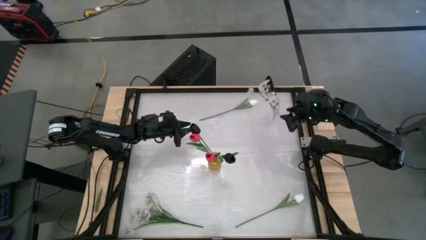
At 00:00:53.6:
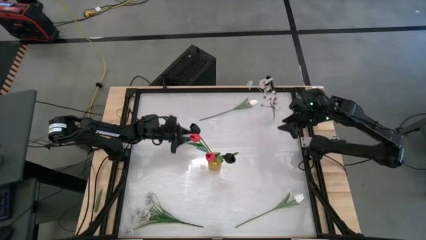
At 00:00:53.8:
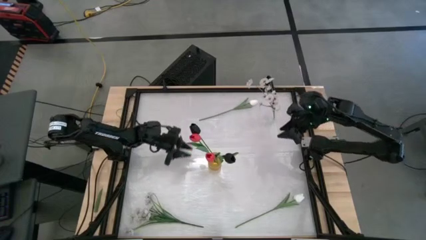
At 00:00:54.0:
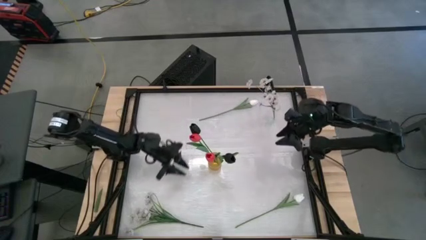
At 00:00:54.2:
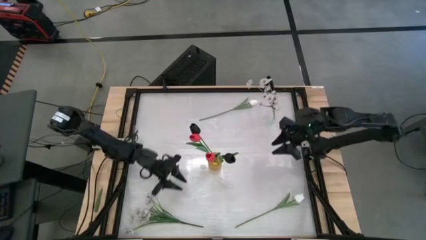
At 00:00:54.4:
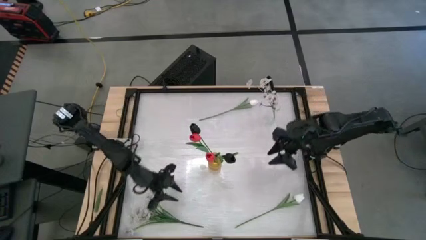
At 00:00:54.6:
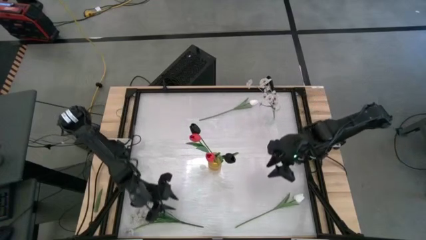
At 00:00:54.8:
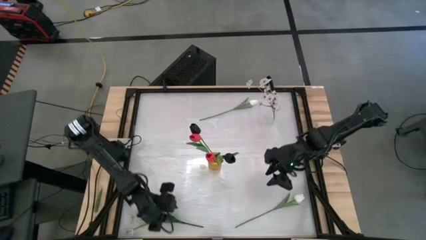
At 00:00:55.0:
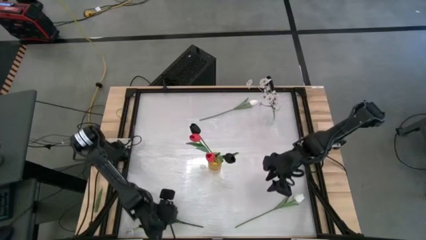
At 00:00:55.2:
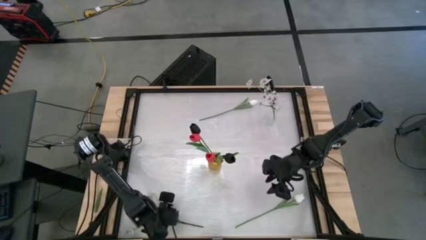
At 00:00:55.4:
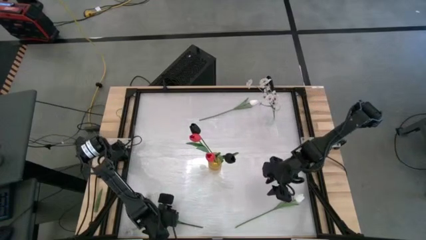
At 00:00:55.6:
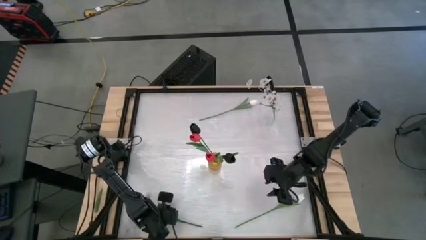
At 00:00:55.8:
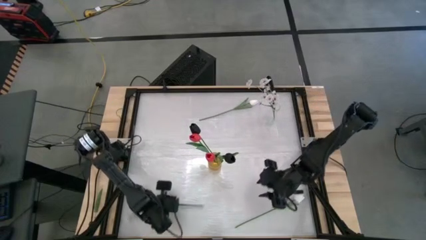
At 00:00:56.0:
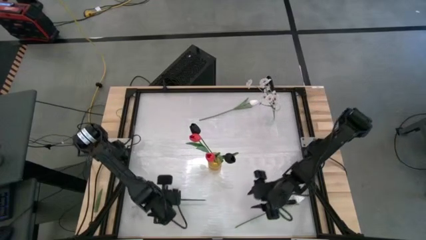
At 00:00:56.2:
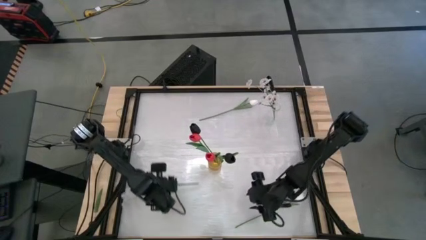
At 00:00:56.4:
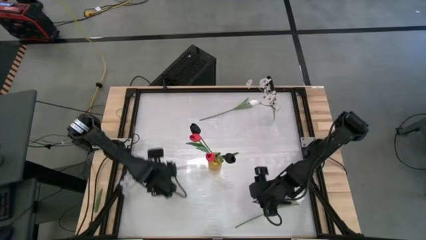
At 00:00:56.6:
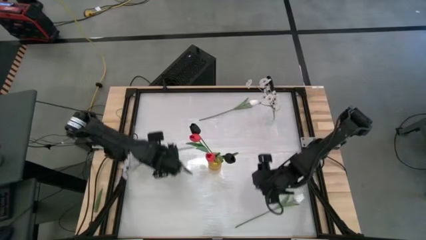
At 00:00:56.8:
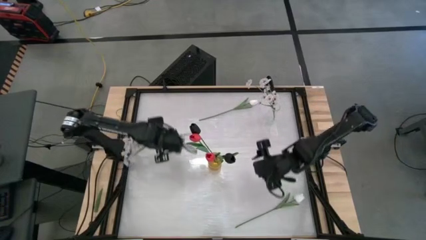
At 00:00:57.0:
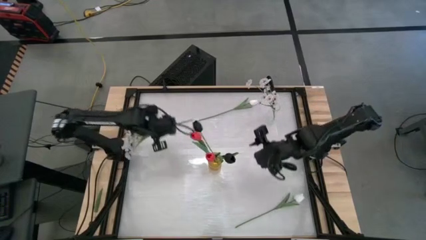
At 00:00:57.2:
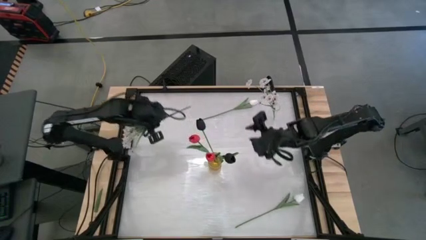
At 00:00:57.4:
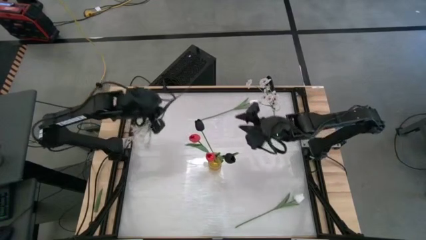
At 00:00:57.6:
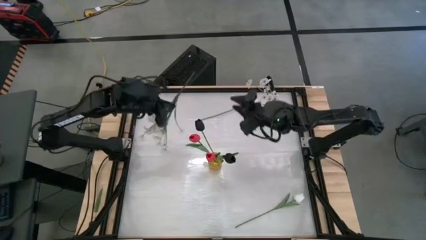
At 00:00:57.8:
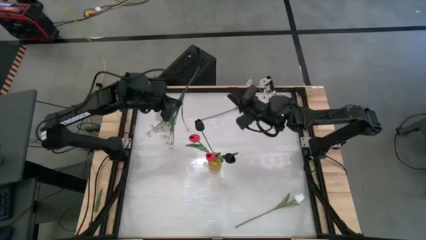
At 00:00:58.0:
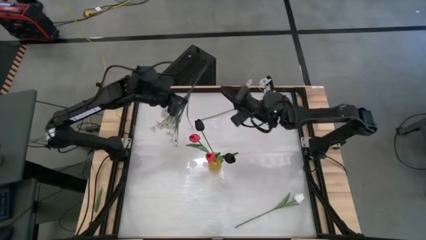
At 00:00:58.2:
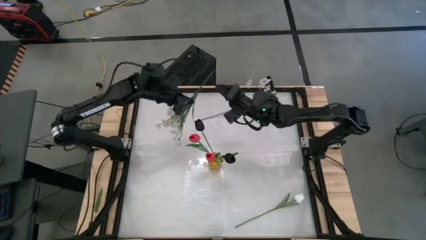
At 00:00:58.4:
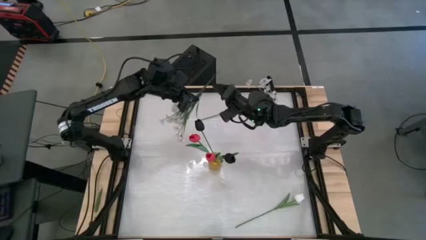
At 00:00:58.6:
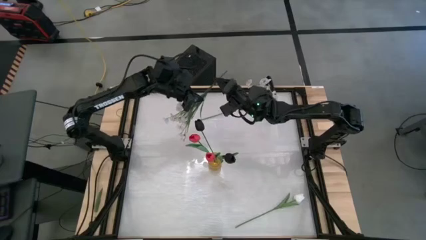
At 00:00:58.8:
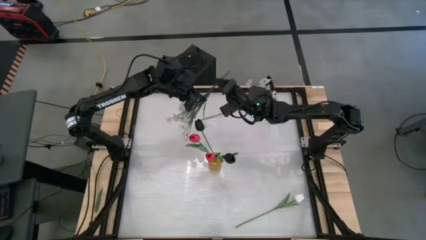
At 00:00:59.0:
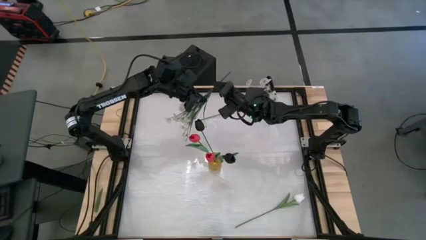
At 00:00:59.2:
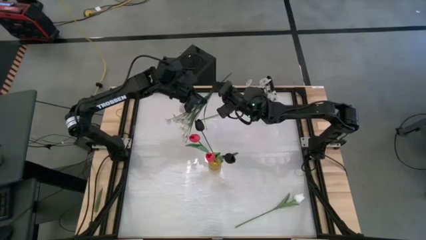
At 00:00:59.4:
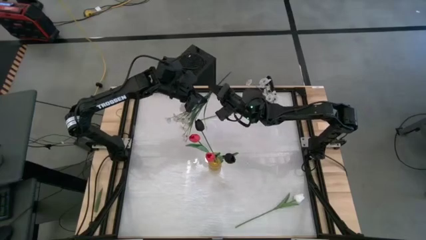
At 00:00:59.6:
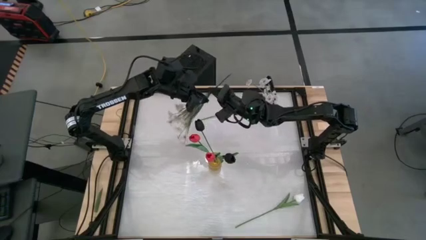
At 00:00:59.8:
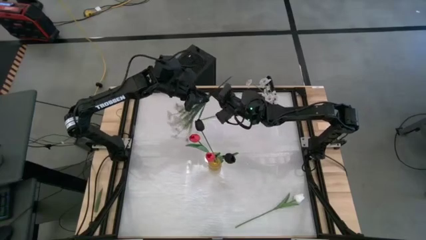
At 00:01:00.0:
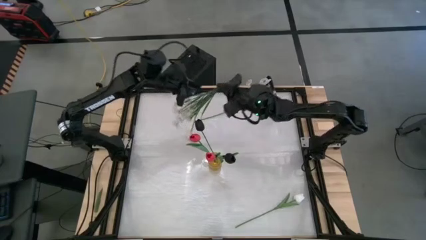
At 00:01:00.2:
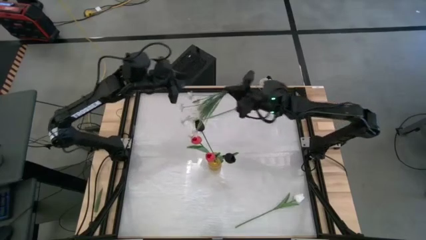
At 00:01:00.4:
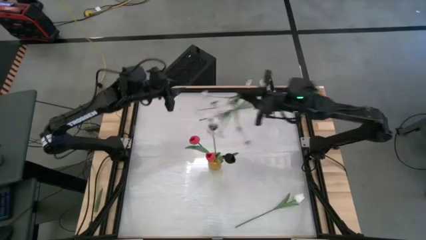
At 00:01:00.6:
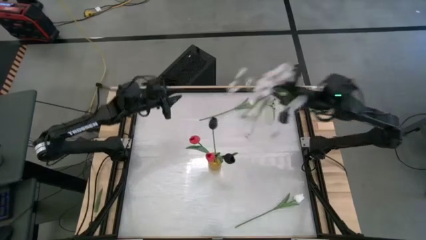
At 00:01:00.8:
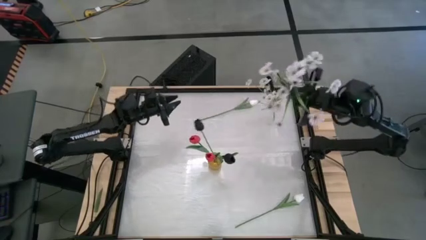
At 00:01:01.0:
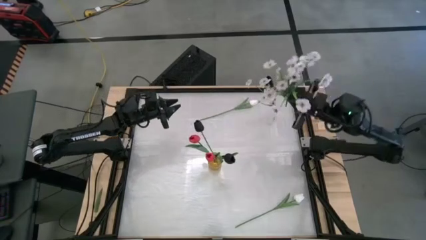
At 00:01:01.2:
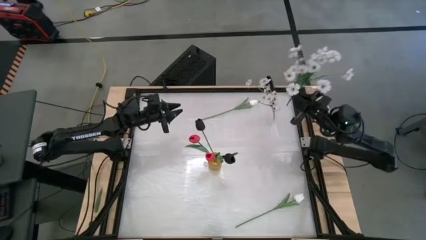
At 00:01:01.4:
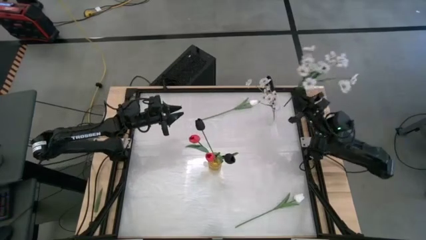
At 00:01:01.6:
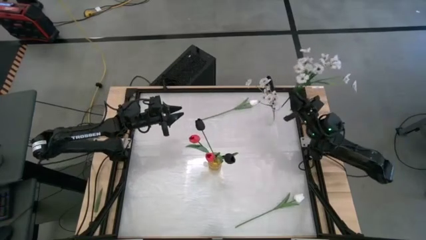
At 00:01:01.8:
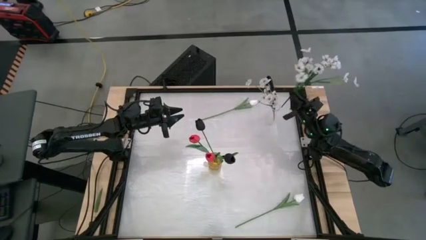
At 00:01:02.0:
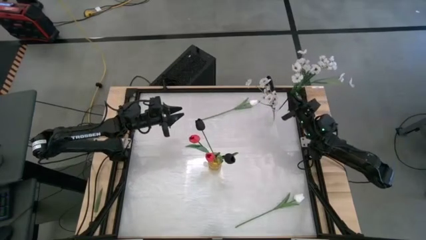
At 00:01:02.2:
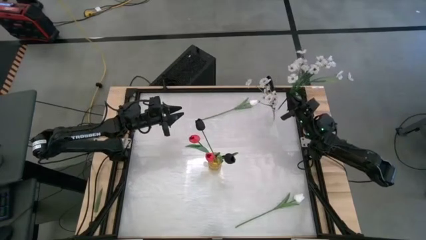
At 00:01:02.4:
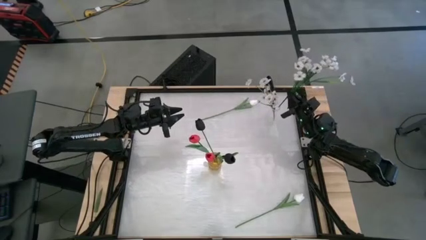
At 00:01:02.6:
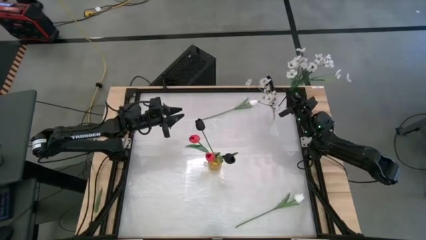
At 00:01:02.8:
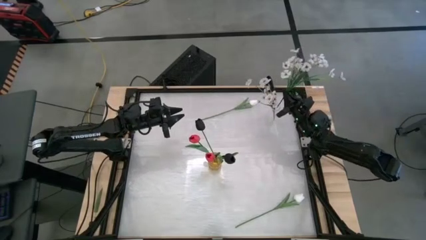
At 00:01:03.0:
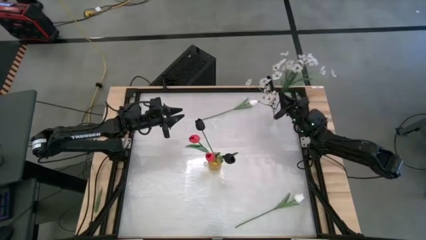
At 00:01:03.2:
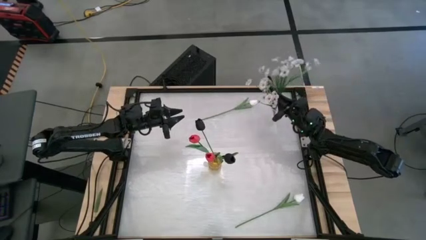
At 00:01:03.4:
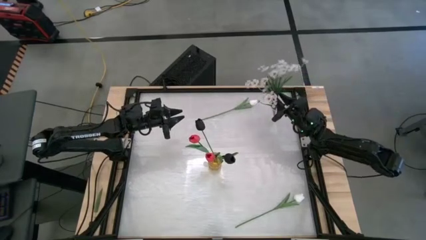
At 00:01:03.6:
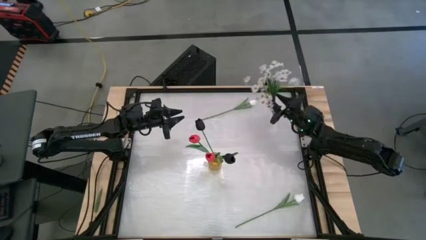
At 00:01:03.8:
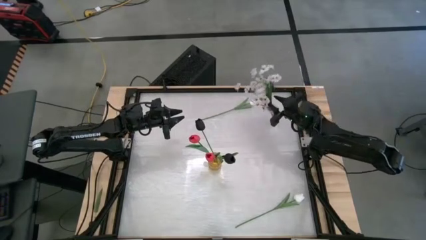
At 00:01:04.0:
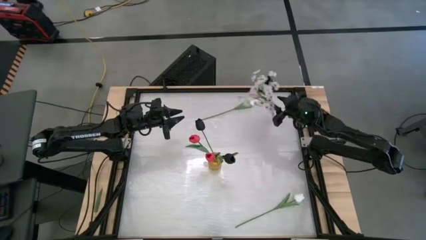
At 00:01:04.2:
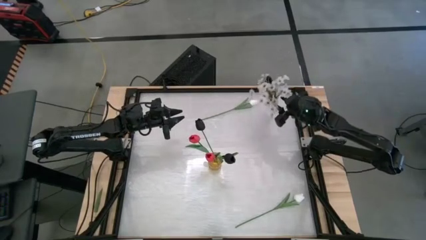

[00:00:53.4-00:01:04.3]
Task: Sort flowers into vase by color
Put the white flowers into the transparent vase

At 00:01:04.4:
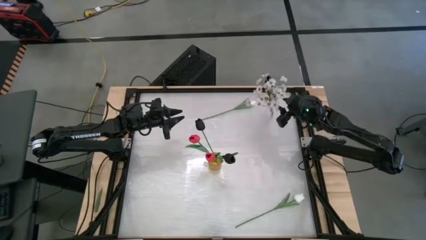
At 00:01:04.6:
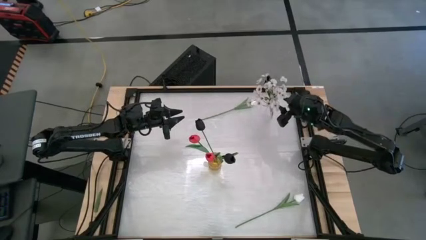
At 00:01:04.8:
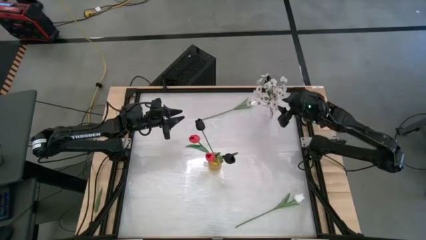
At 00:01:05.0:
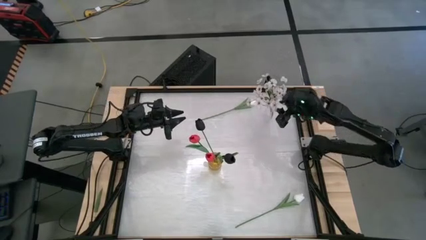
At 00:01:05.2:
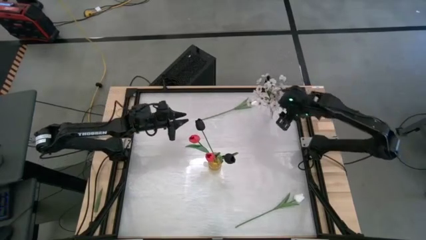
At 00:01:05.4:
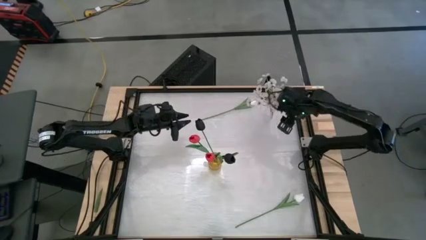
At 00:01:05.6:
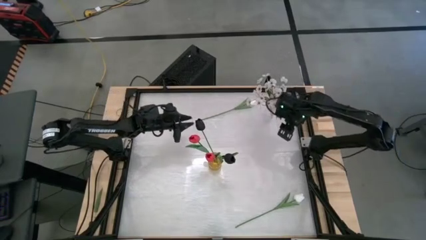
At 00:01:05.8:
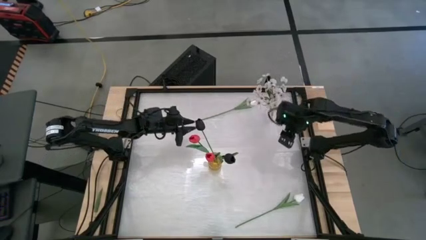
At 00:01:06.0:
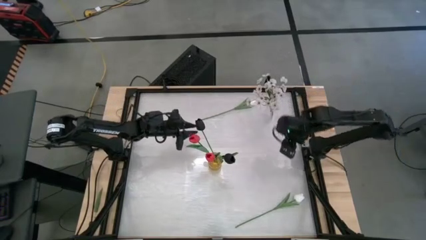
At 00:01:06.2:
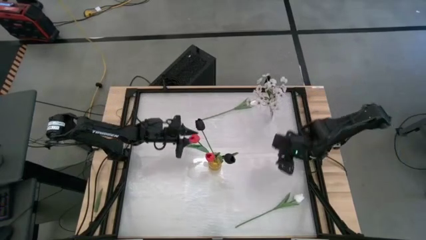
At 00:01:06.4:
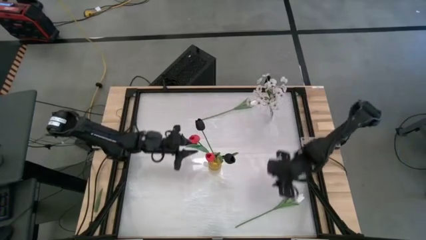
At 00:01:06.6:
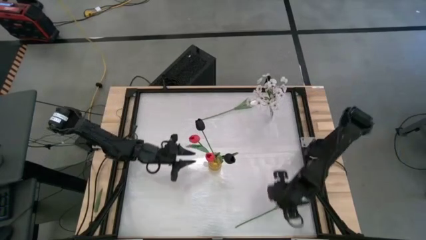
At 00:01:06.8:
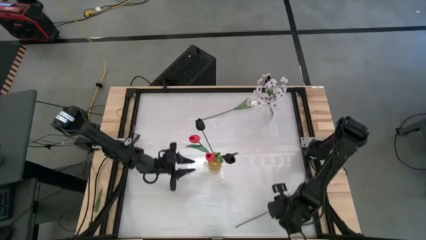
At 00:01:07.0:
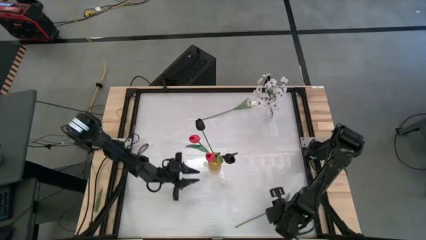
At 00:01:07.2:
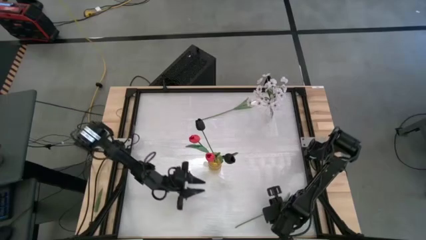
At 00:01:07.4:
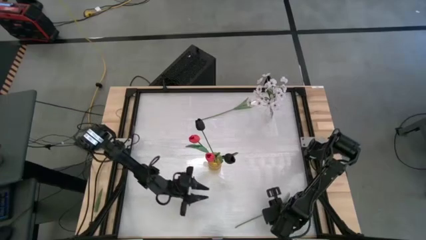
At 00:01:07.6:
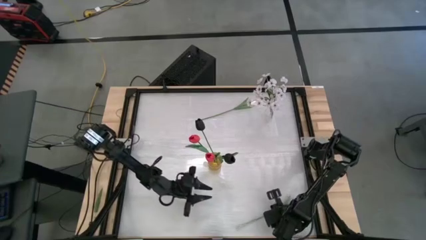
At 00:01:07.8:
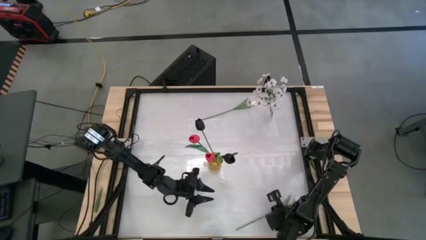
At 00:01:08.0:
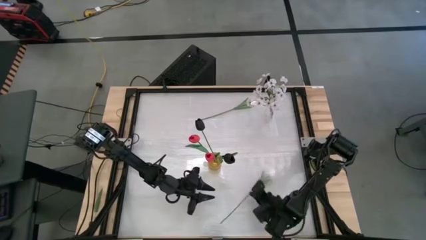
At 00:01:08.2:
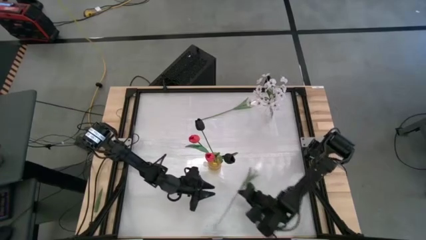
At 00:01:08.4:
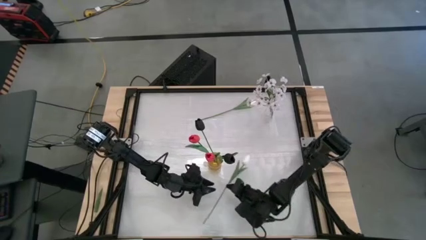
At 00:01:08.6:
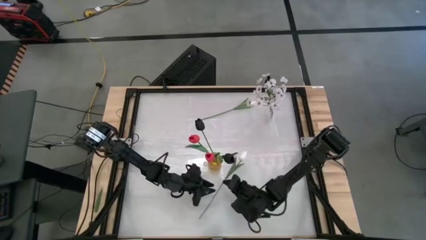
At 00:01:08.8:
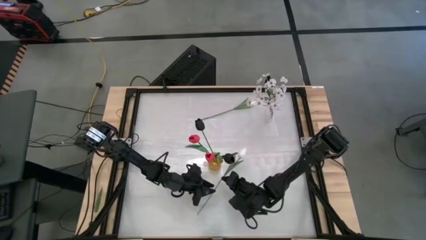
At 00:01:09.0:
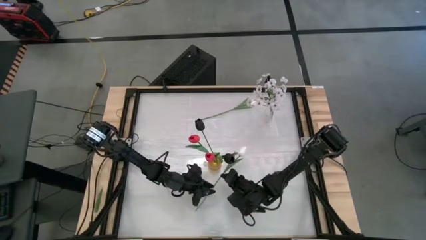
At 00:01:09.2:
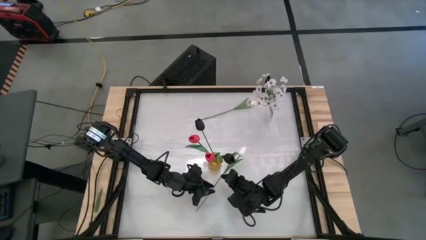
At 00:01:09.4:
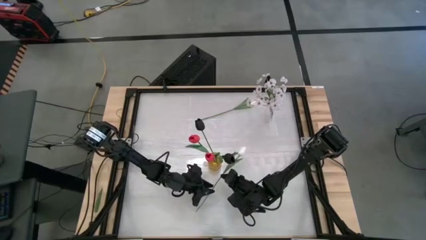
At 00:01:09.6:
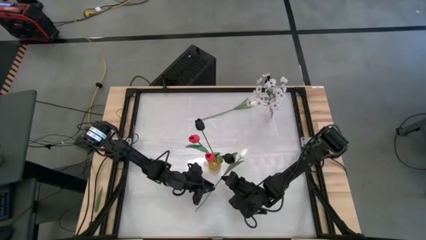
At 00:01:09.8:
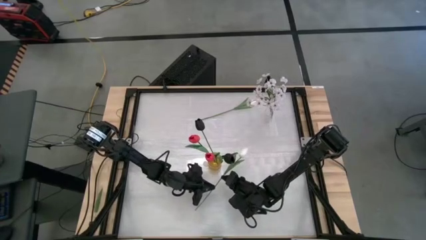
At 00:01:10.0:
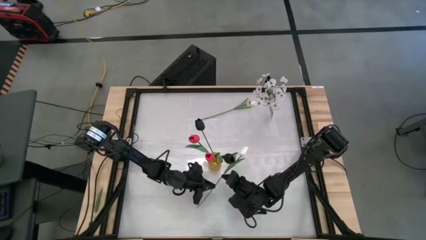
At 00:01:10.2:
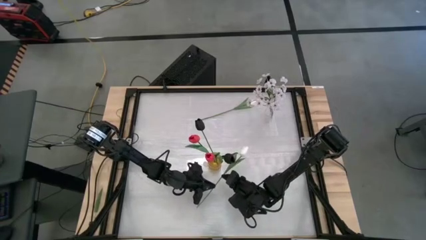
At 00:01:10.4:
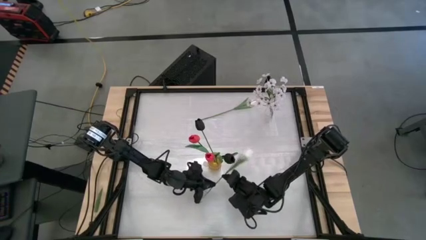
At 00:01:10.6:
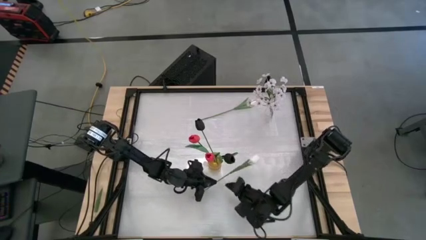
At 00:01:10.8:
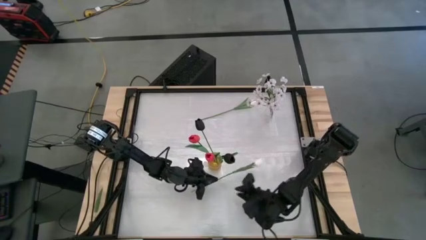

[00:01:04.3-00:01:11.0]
Put the bottom white tulip into the transparent vase
